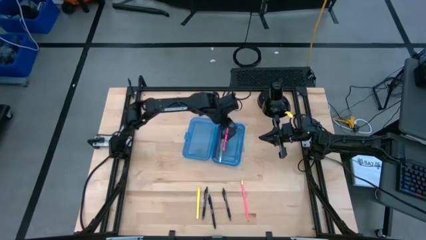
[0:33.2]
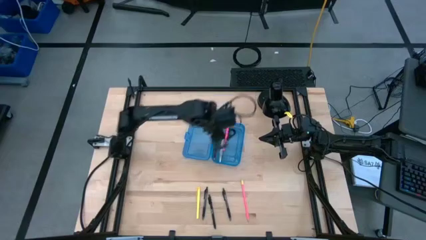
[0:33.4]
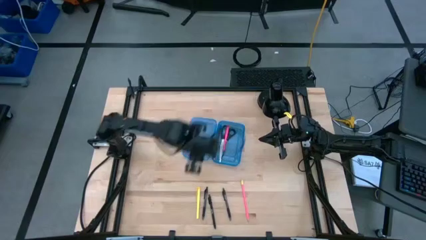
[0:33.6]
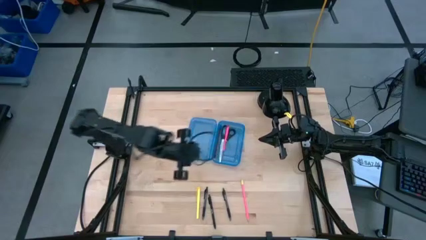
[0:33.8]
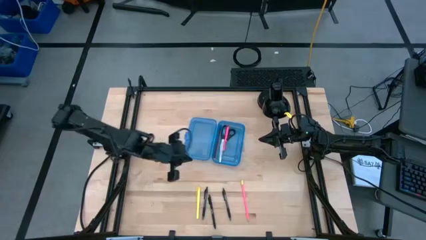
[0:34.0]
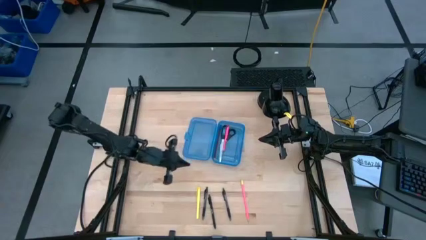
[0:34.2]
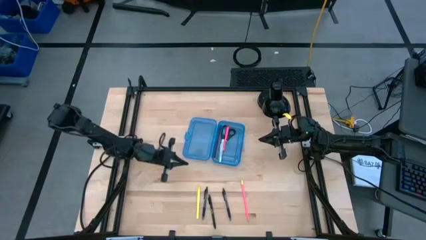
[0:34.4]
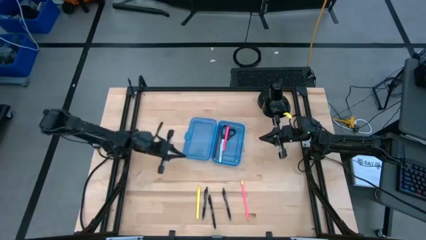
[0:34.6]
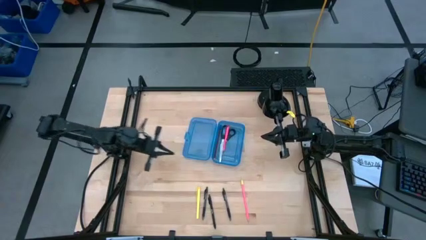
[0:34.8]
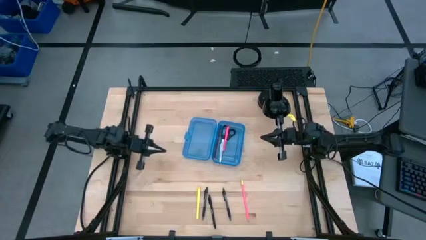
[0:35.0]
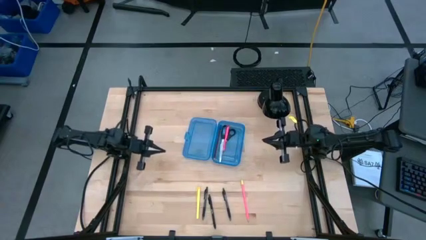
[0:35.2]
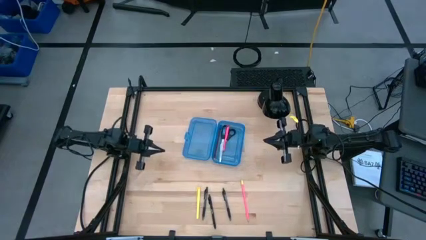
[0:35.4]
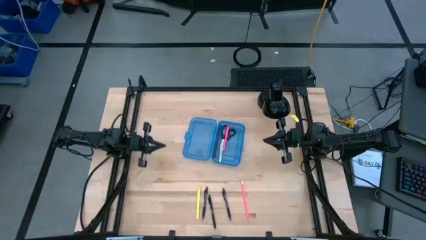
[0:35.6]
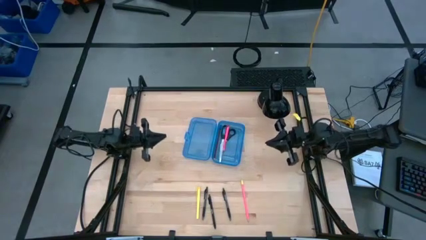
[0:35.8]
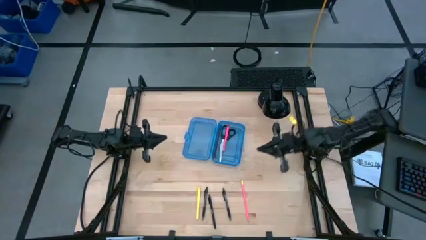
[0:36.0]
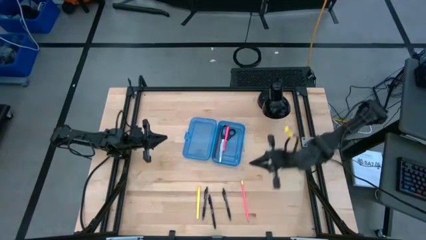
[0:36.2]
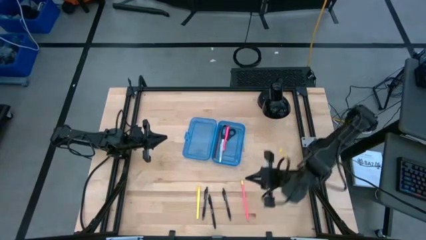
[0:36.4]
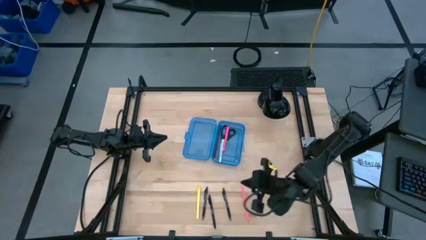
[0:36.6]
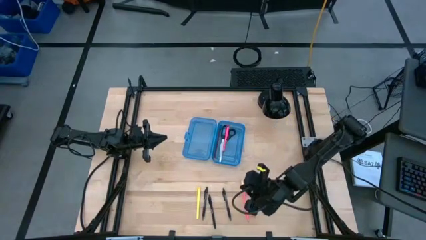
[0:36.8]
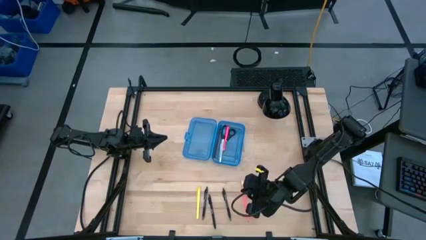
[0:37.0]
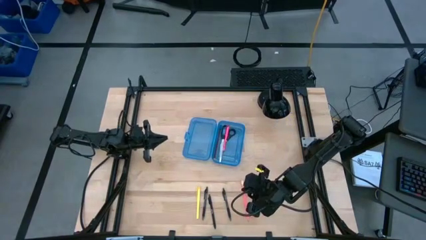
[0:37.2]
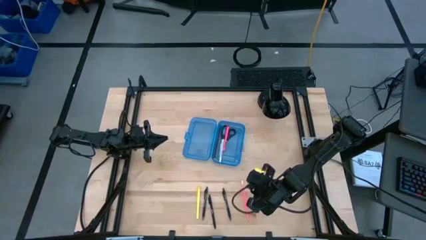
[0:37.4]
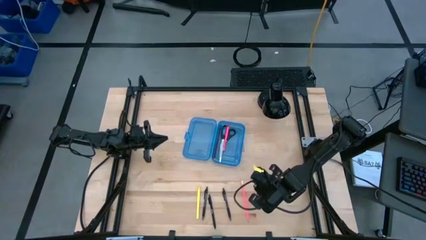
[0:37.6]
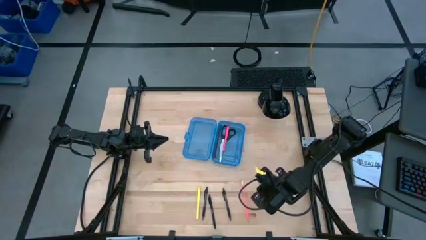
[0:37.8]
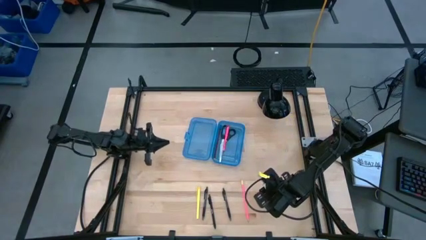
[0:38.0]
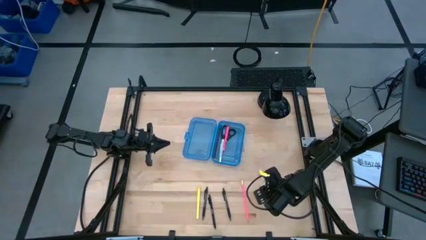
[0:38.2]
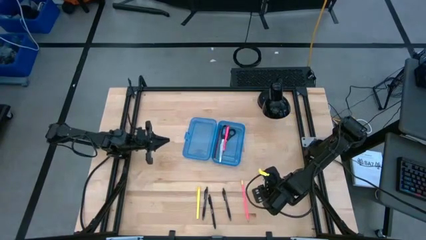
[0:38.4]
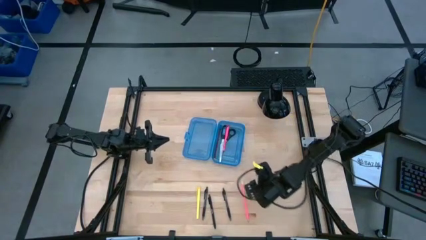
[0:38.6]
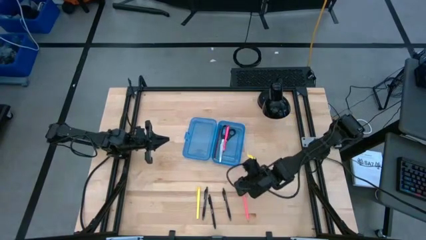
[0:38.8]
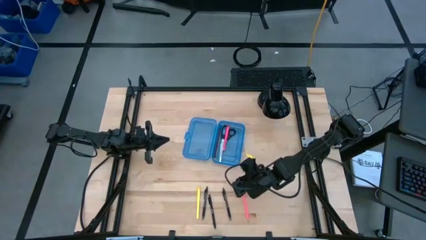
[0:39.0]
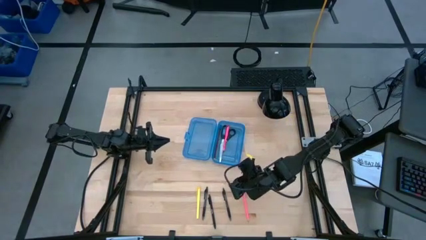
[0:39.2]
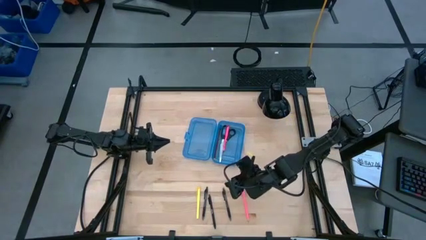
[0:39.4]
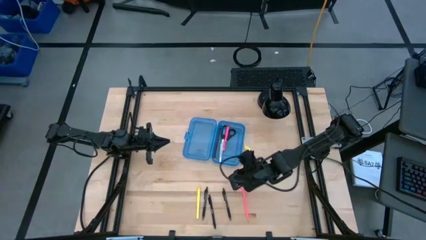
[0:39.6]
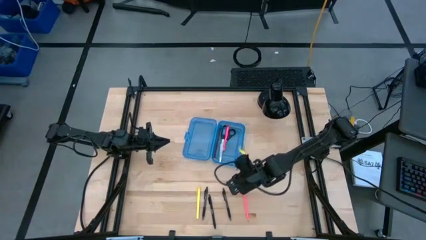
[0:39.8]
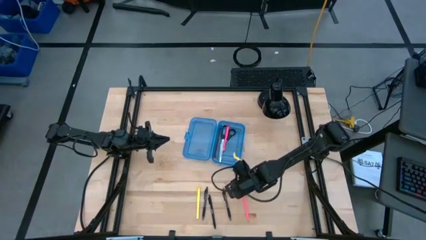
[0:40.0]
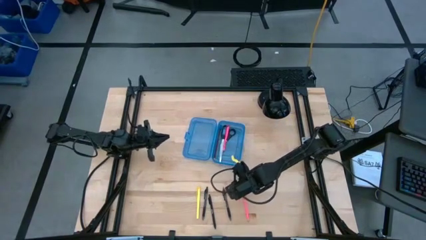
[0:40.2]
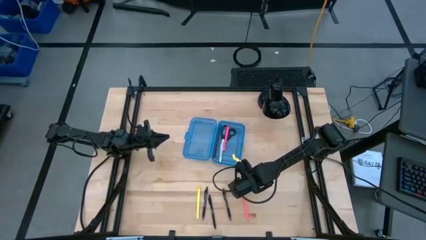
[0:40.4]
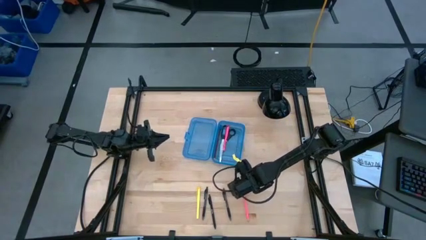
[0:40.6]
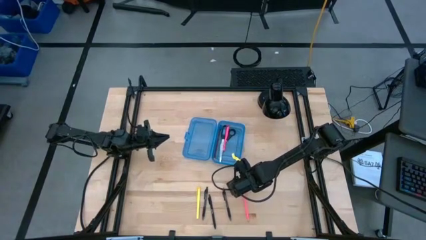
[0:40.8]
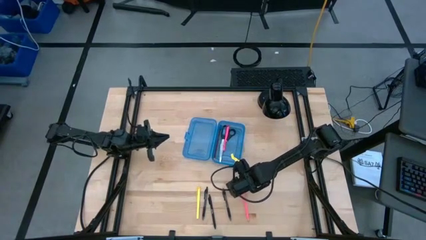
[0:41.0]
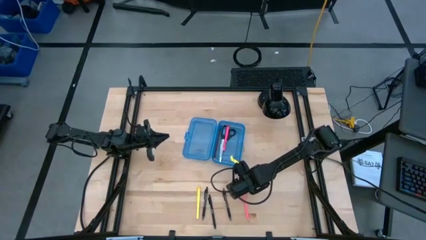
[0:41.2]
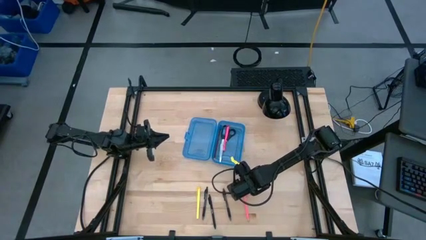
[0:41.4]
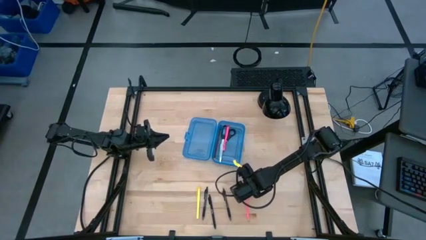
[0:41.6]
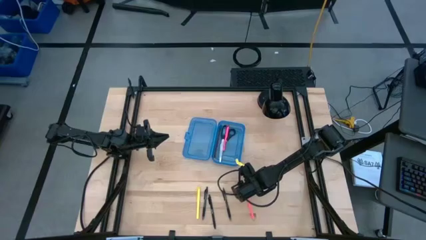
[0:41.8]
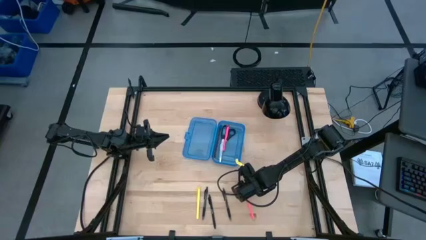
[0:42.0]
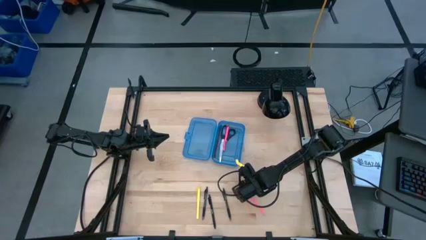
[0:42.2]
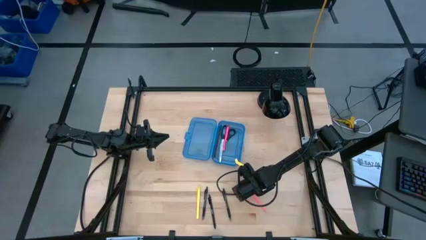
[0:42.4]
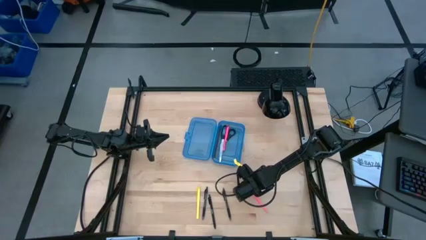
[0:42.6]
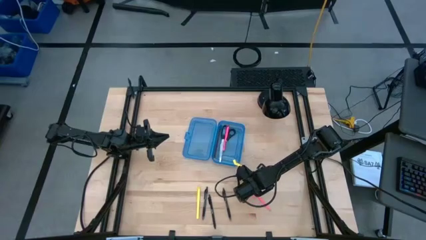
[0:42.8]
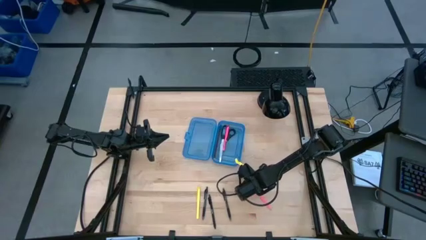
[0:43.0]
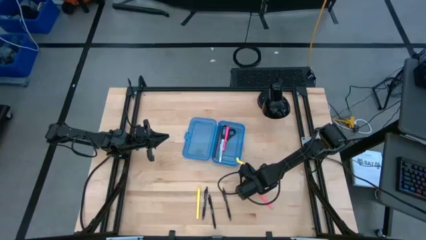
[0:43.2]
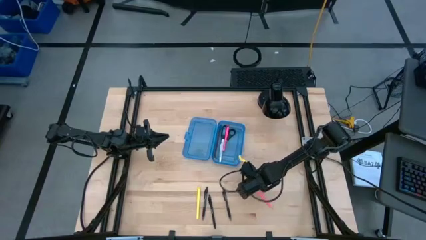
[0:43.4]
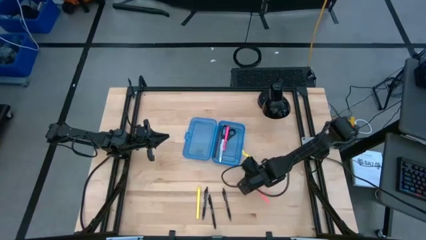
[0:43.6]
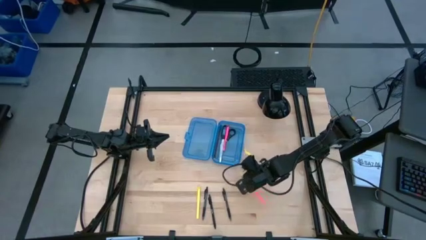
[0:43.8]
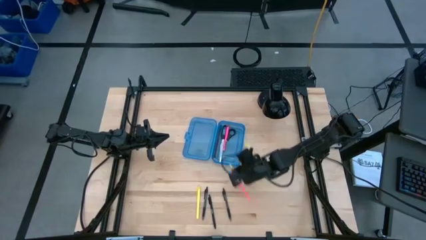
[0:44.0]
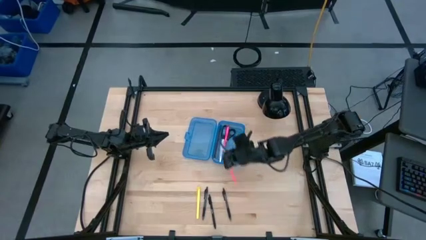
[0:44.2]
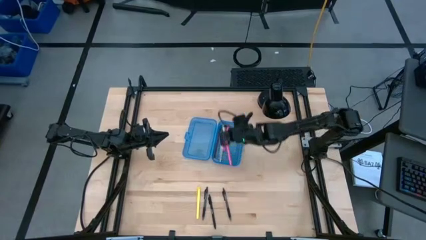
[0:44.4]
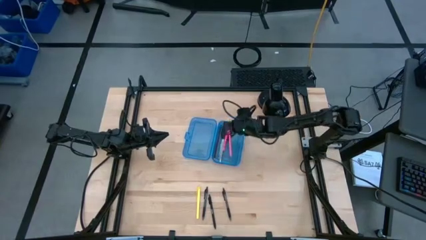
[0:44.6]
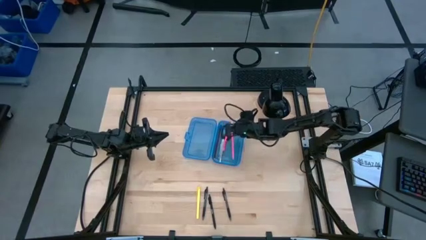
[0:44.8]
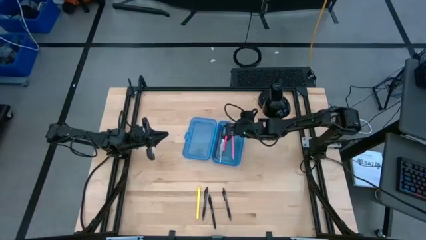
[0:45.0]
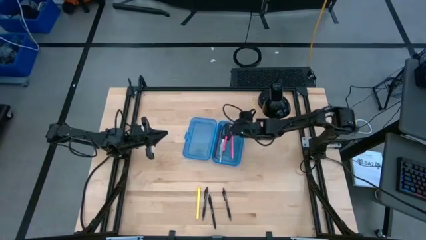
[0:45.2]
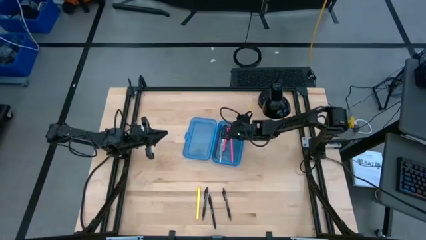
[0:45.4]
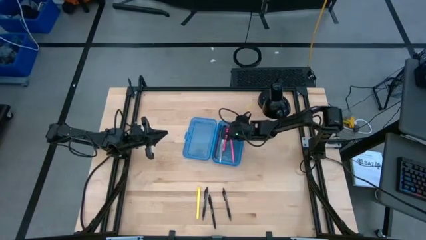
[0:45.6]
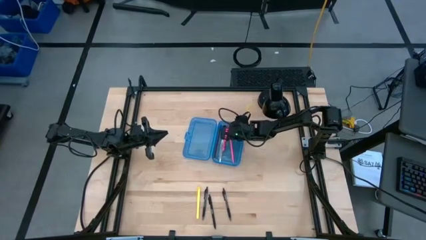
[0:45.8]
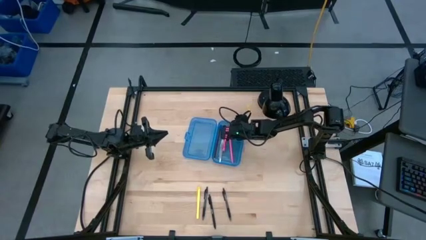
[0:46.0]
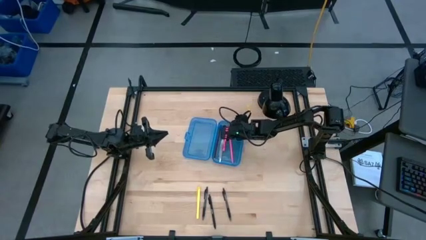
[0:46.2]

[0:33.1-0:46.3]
Task: Pick & place school supplies into a supply box
Put the pink pencil into the supply box
